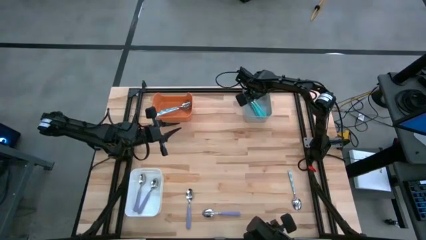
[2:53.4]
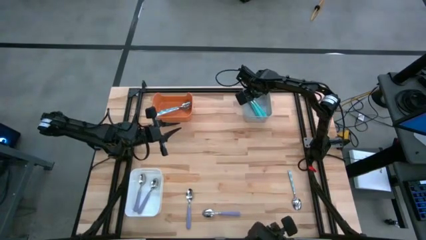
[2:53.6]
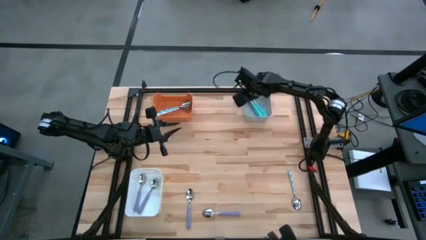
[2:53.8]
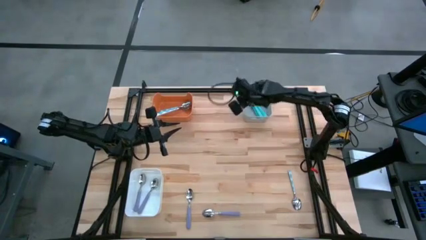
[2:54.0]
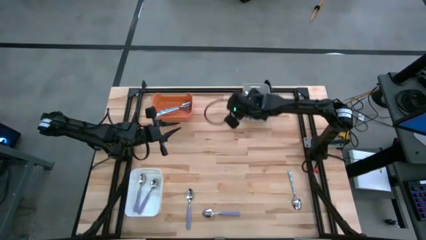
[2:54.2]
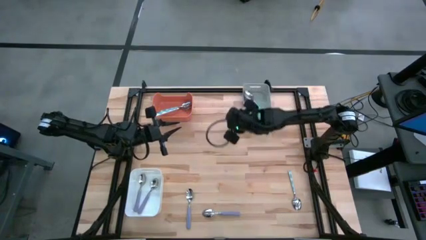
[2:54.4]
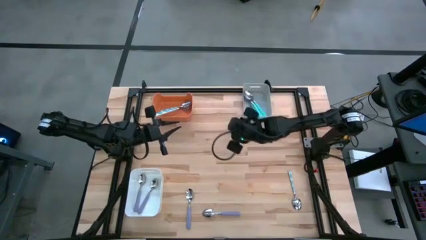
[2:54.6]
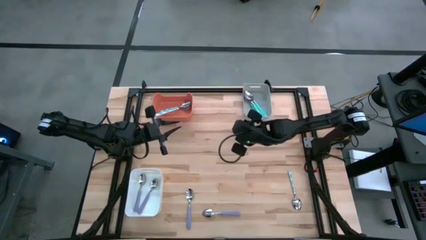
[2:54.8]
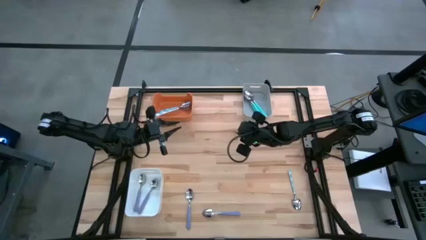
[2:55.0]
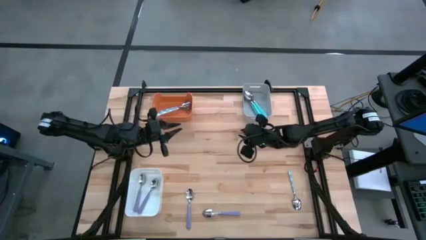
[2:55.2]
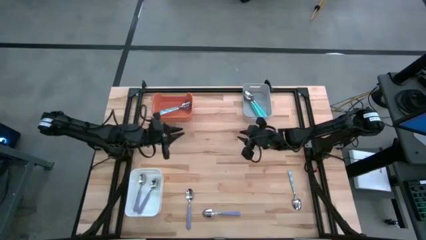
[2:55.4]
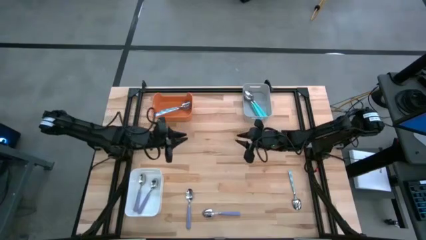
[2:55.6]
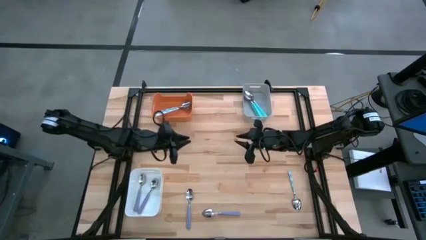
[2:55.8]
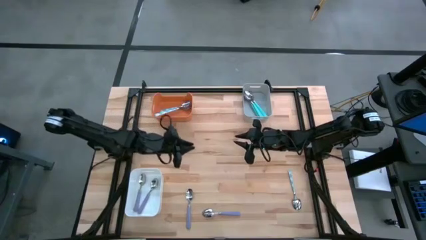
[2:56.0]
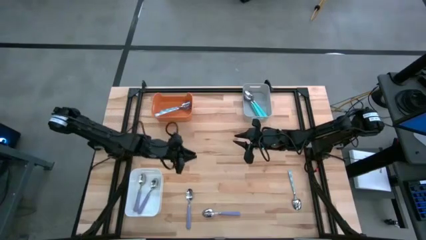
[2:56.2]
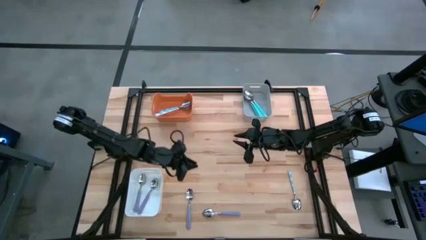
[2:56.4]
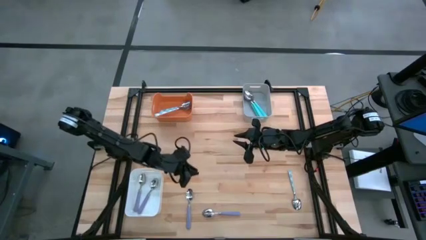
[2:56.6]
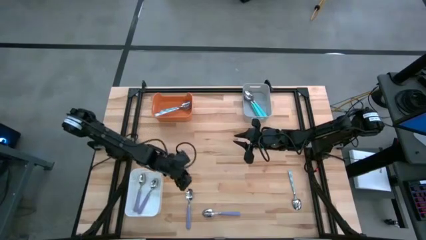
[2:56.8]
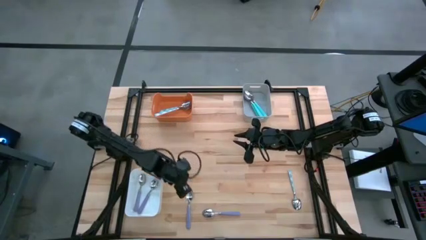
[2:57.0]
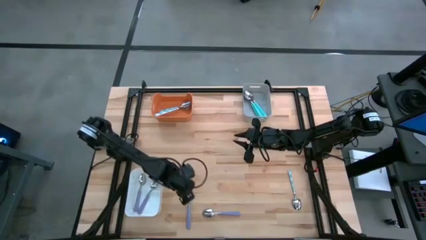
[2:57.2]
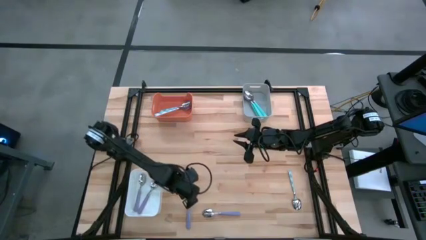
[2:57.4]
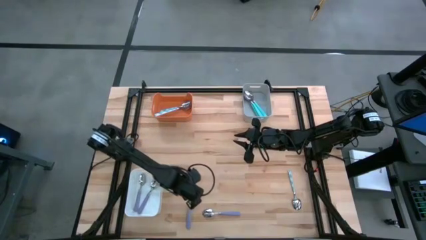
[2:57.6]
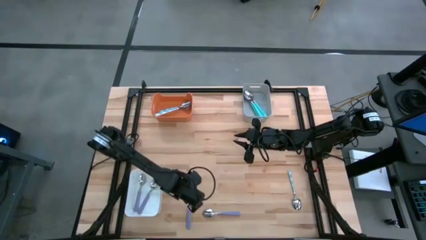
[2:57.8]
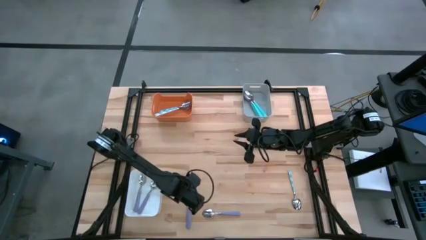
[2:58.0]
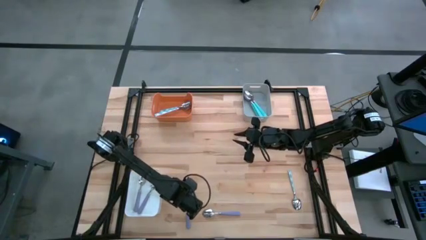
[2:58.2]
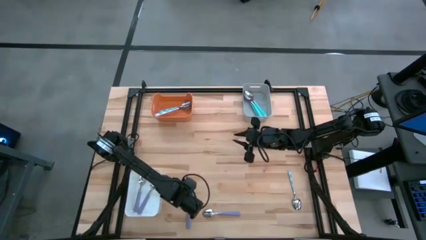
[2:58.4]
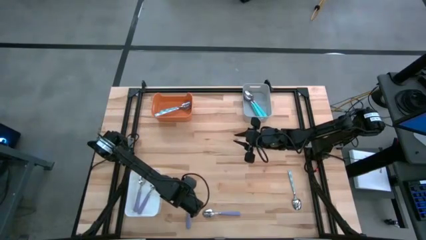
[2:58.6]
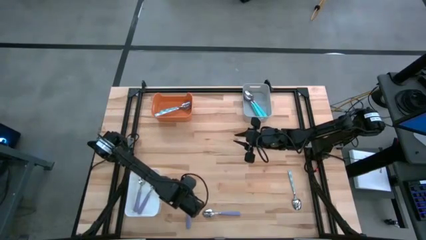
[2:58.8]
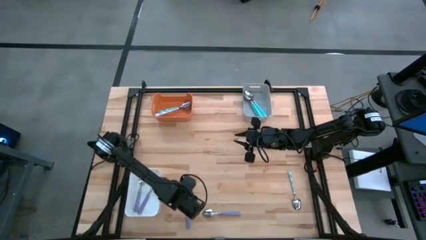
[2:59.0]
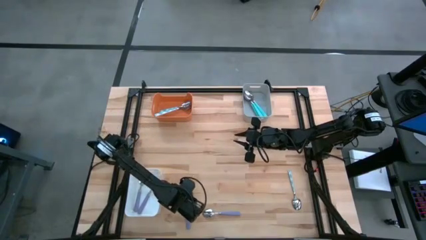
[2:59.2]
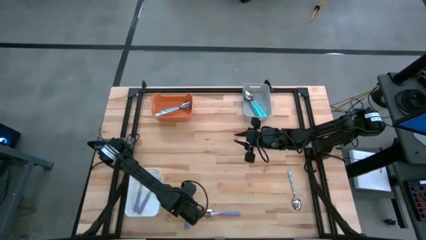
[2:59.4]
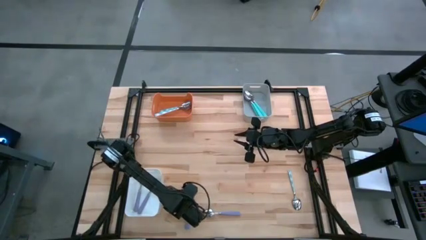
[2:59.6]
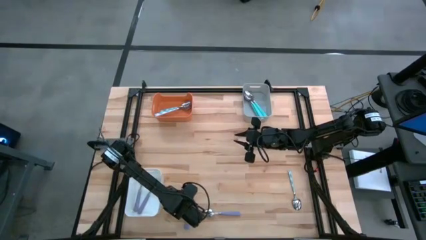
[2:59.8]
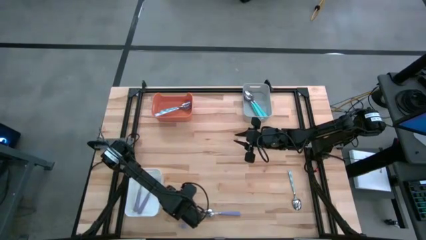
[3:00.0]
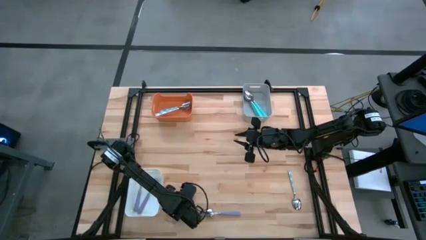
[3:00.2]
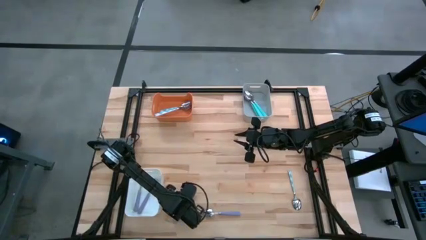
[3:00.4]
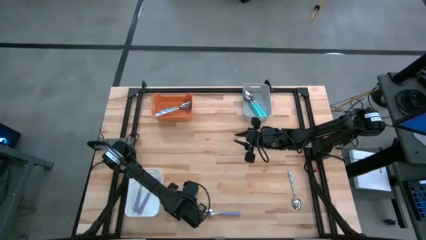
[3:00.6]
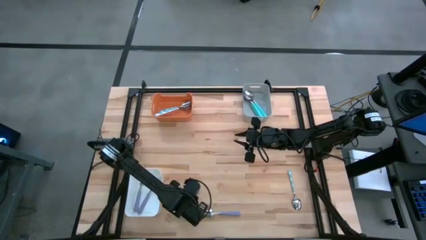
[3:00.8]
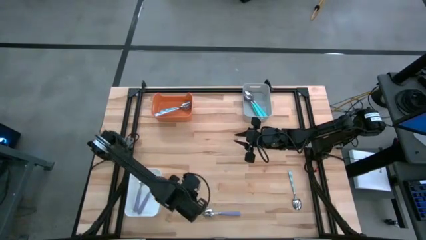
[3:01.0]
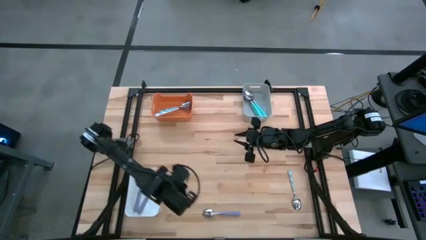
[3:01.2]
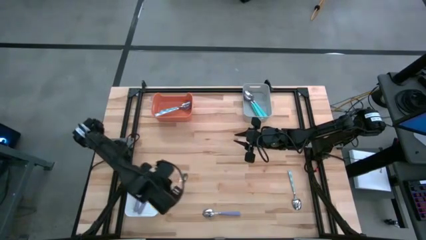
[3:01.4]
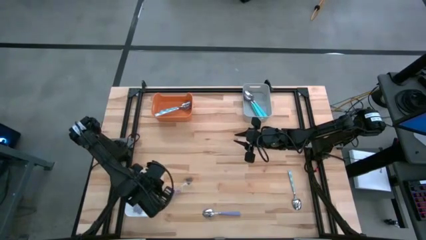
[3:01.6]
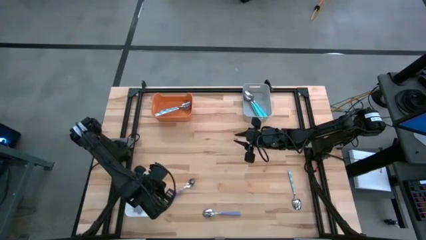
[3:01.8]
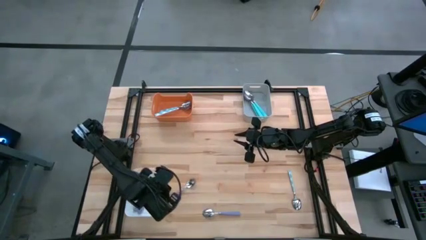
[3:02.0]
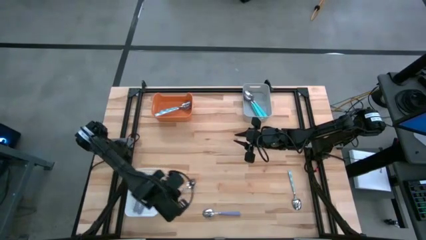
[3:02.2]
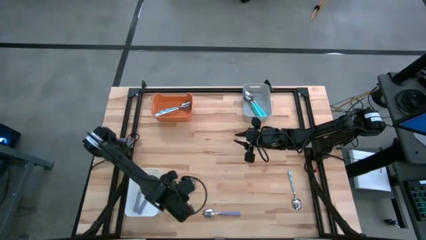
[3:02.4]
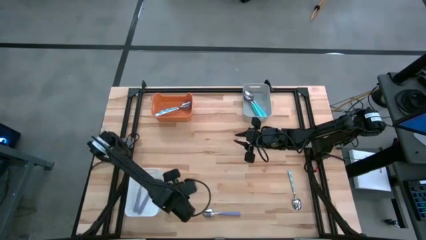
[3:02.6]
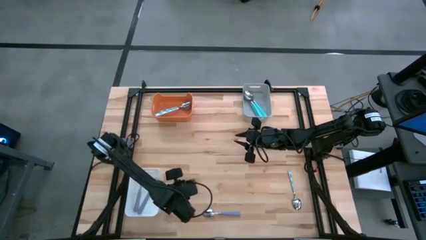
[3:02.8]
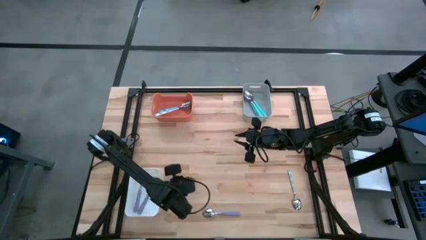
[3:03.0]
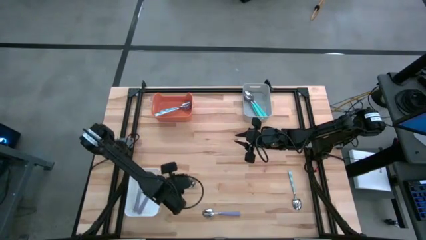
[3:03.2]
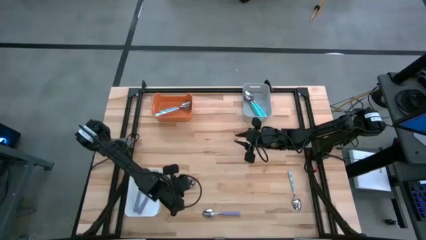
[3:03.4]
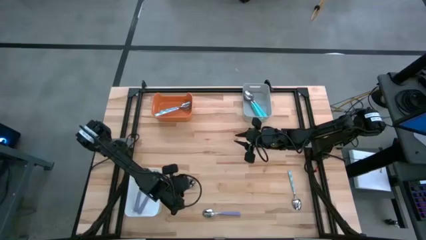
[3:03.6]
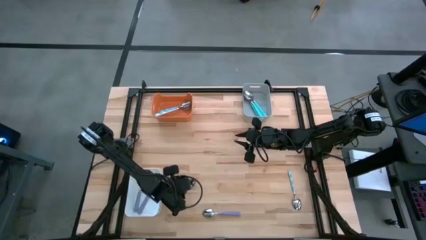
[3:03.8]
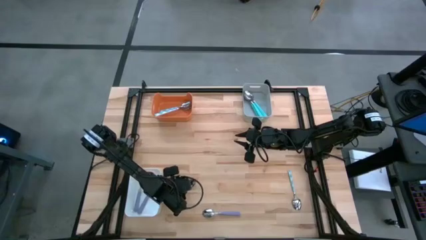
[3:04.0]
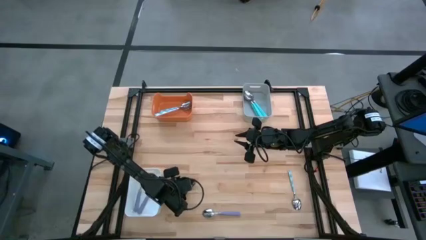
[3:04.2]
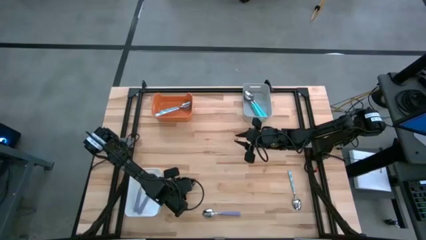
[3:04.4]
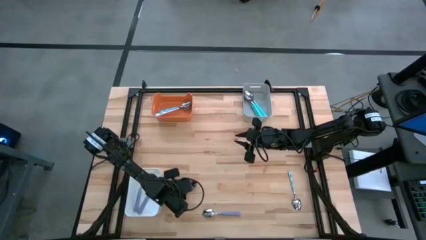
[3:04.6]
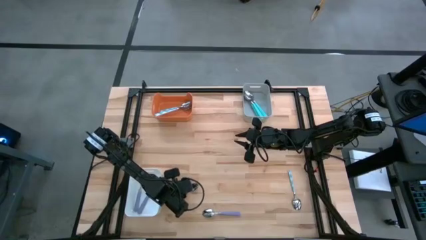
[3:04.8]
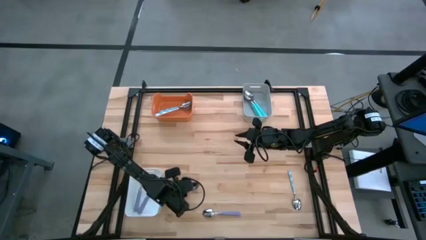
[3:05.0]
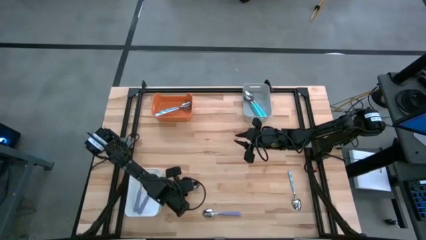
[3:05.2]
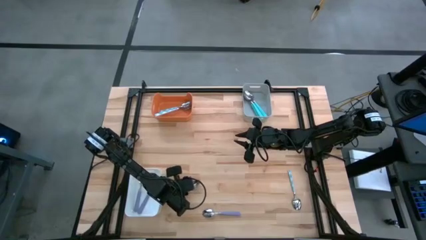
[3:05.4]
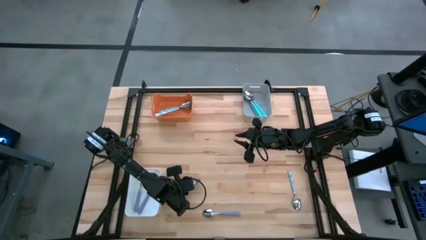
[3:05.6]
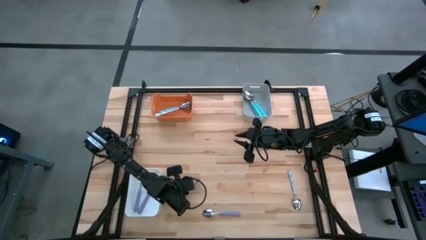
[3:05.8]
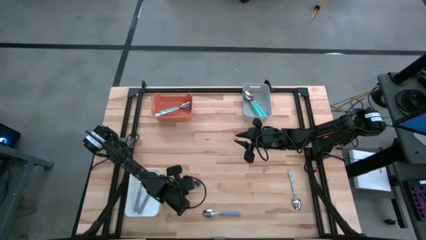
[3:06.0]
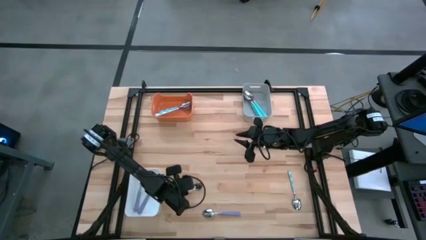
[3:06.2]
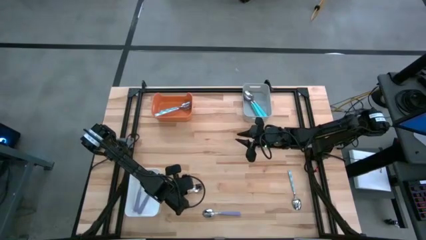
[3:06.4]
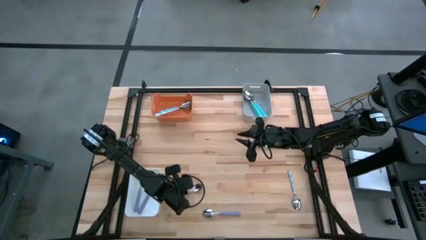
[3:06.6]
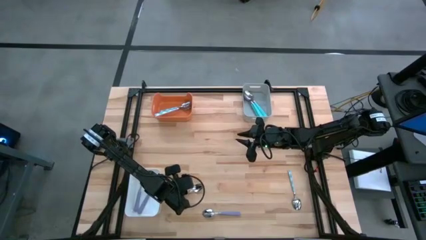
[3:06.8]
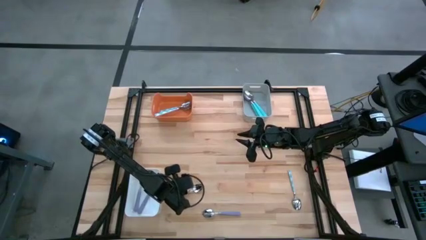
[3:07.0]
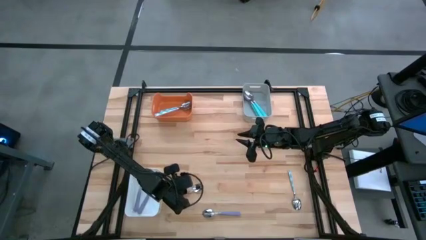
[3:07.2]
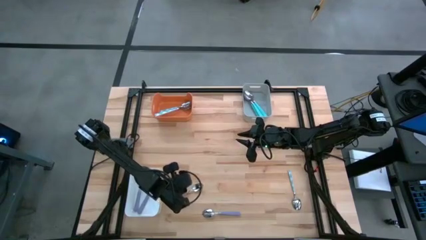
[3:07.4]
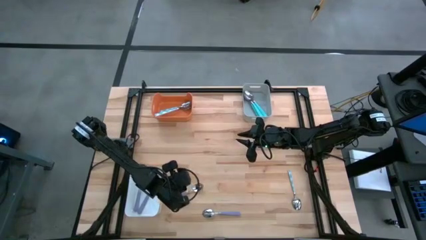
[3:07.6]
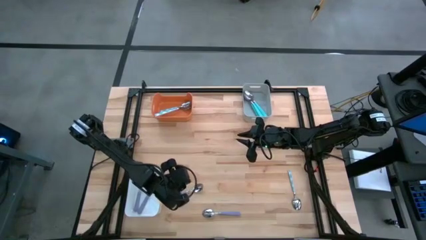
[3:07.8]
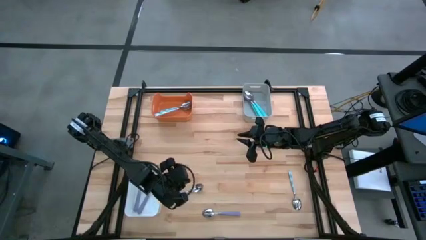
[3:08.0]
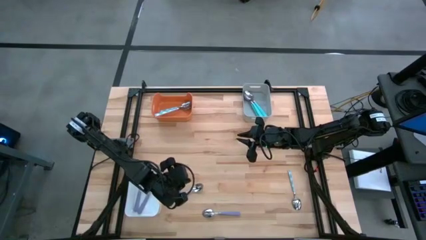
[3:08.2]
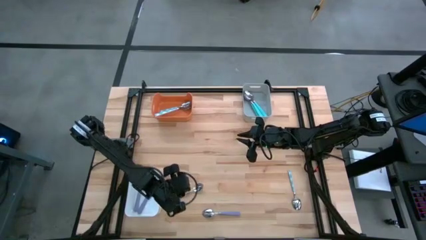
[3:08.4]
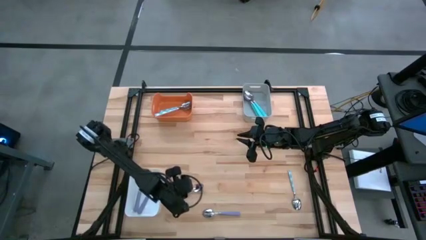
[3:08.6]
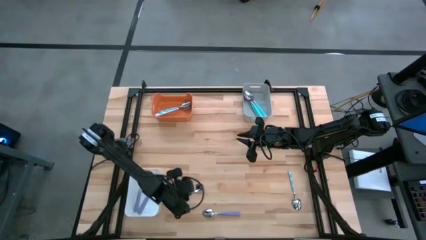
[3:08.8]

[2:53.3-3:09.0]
Task: Sort silverware by color (type)
Put the left purple spoon into the white bin
